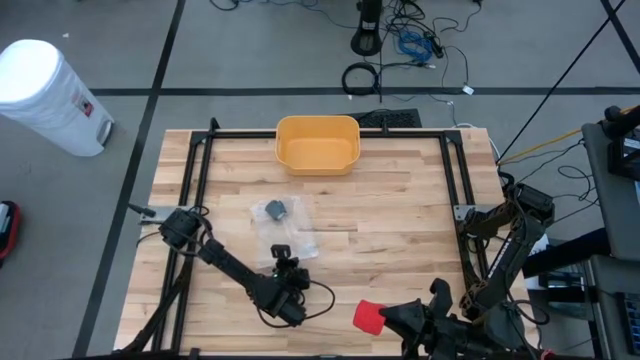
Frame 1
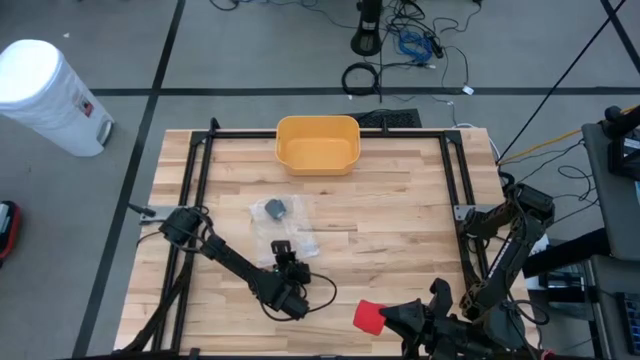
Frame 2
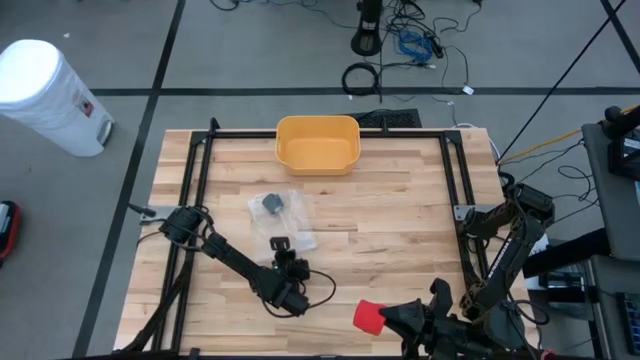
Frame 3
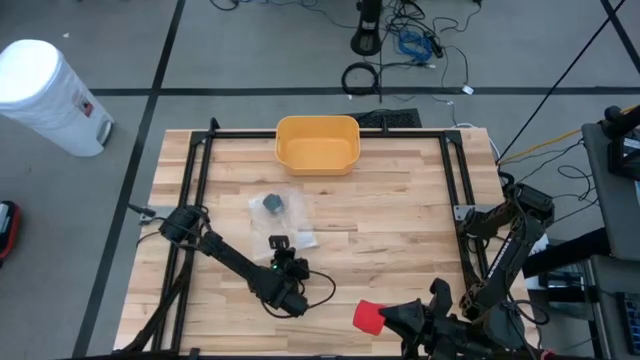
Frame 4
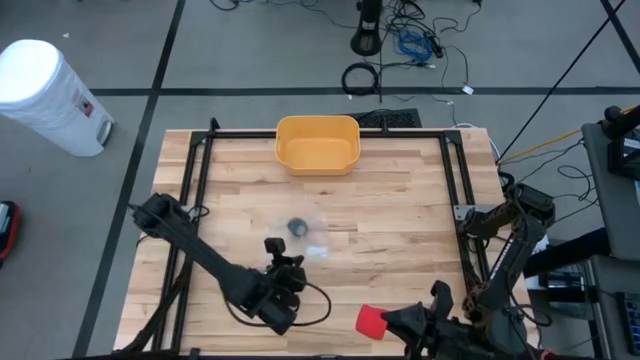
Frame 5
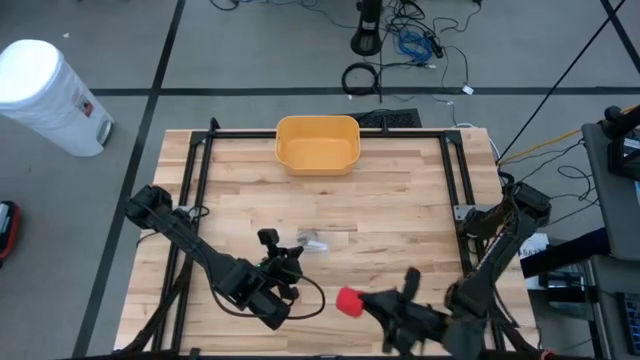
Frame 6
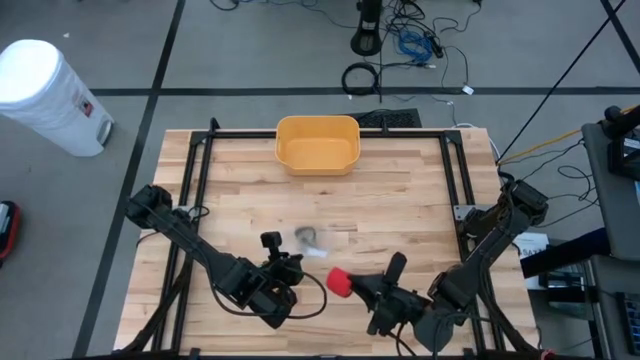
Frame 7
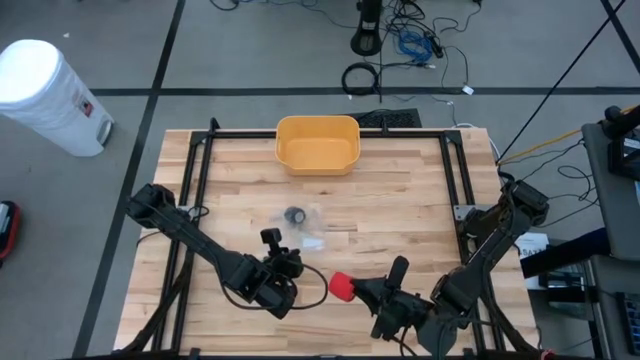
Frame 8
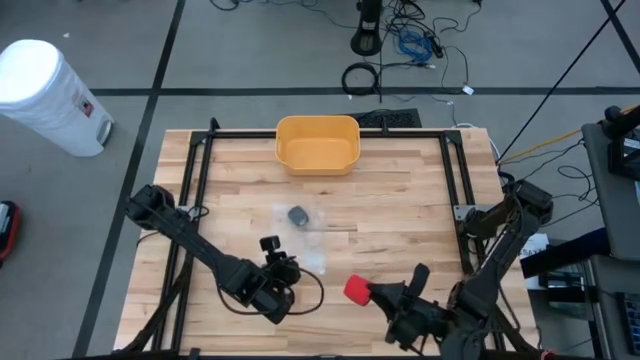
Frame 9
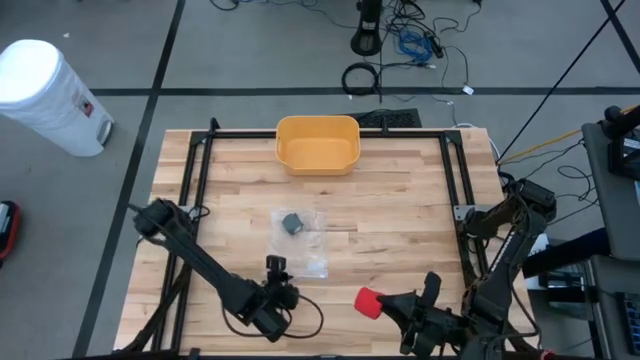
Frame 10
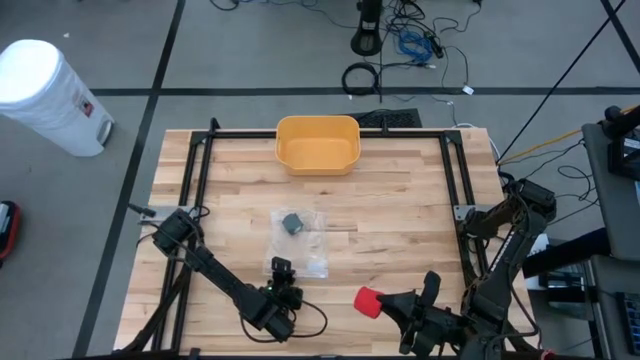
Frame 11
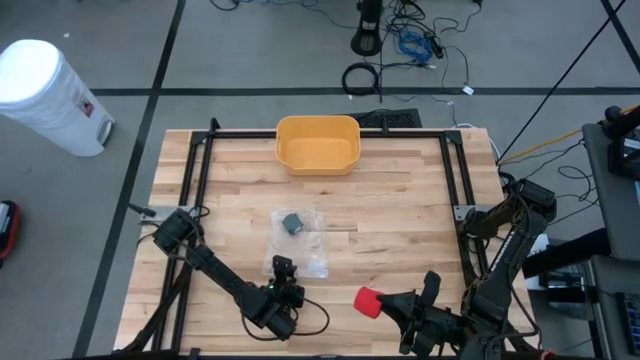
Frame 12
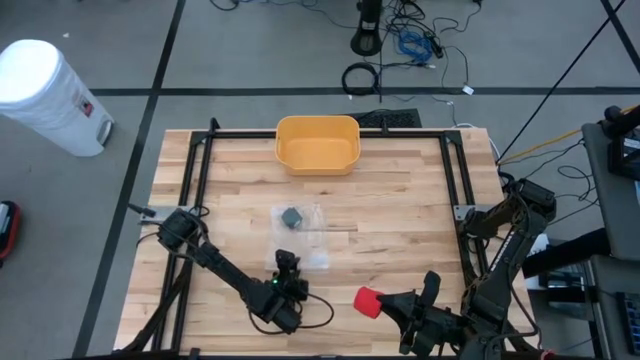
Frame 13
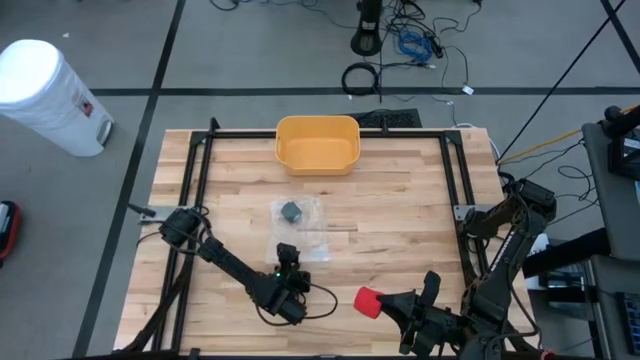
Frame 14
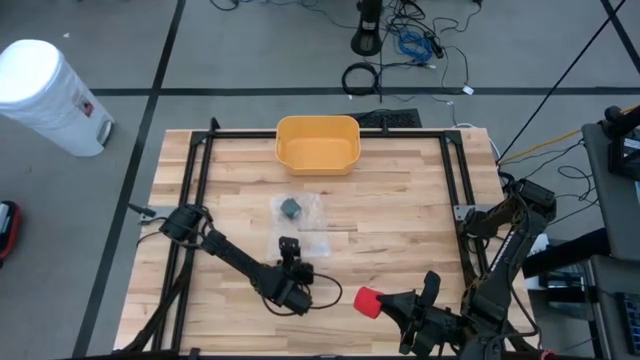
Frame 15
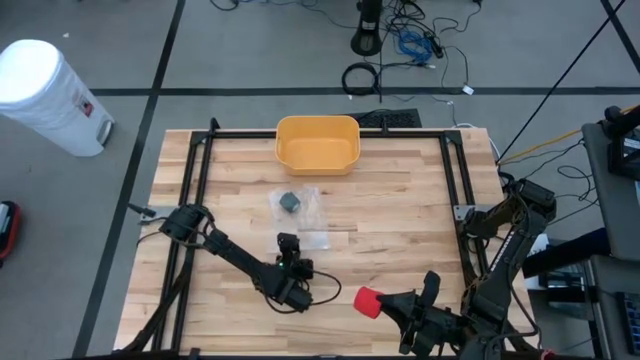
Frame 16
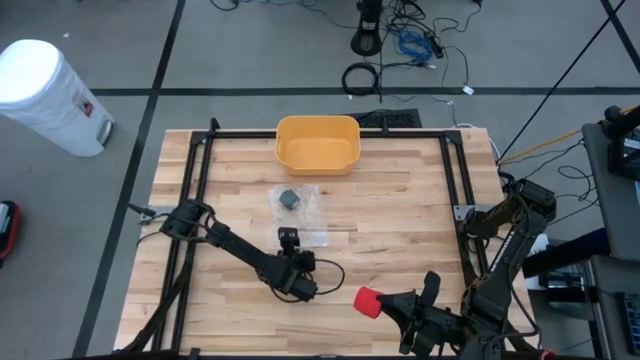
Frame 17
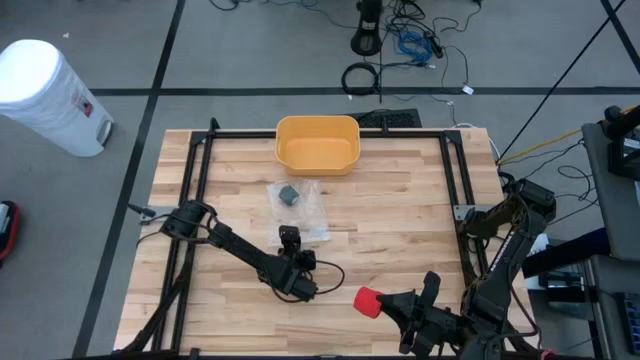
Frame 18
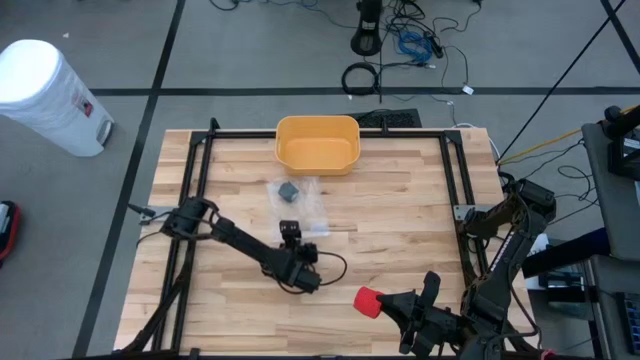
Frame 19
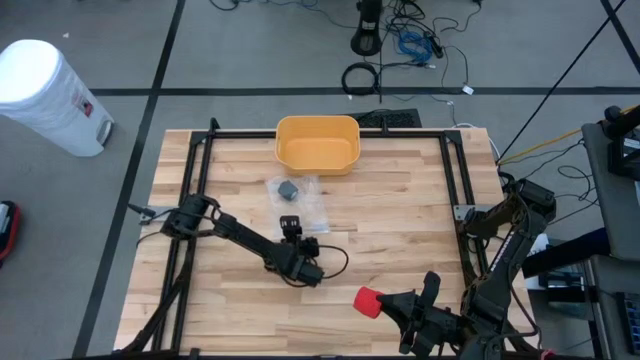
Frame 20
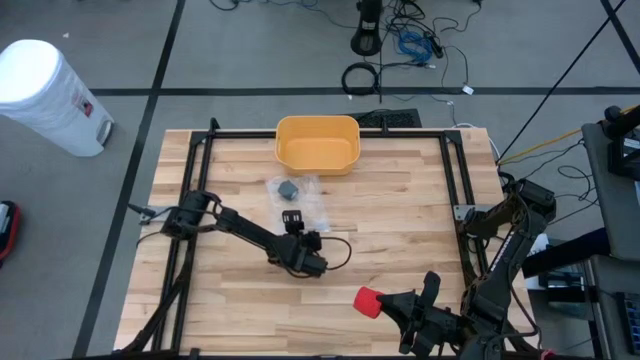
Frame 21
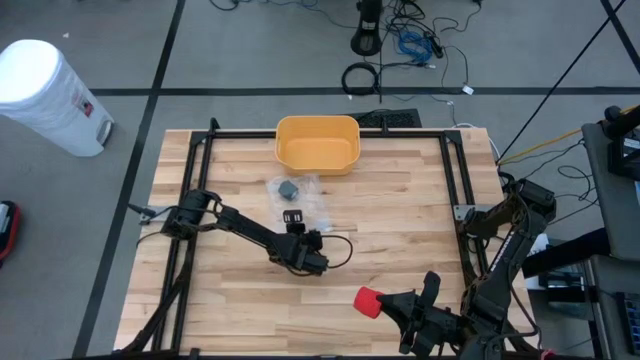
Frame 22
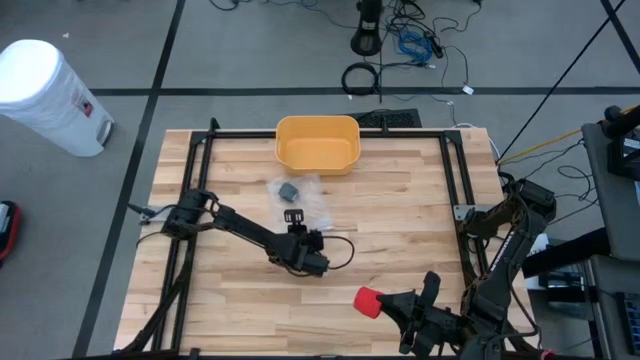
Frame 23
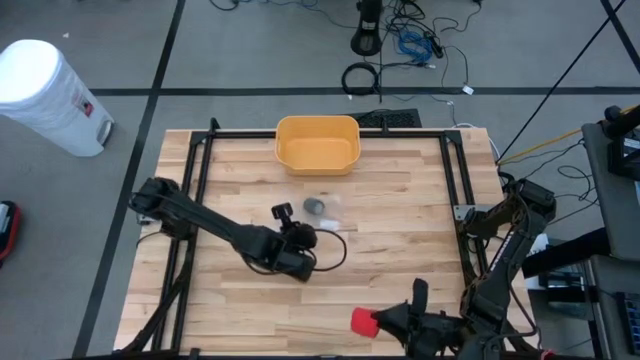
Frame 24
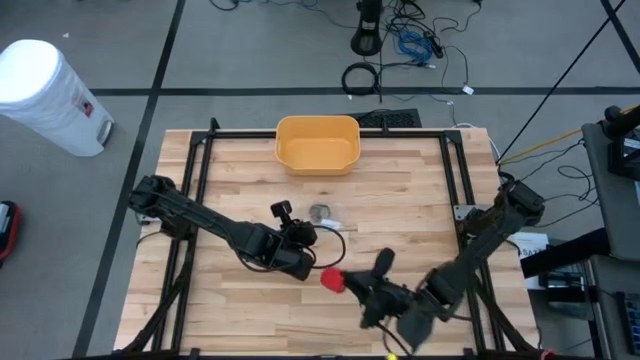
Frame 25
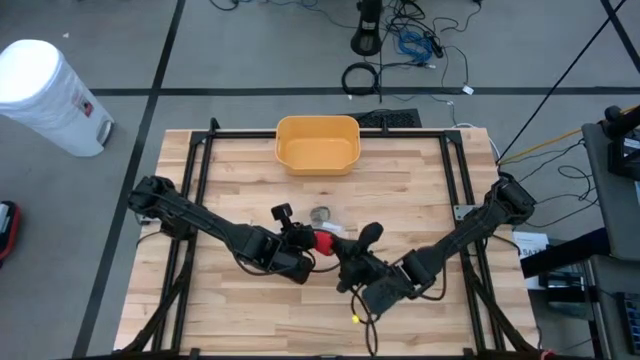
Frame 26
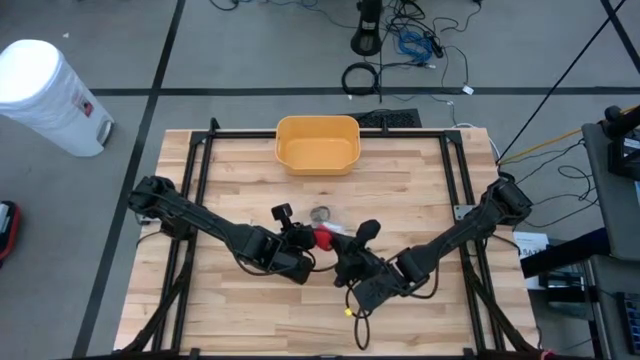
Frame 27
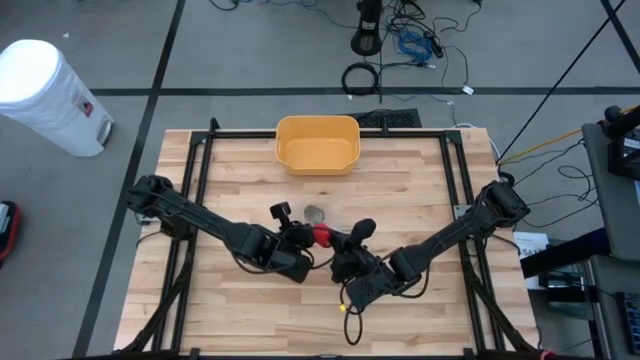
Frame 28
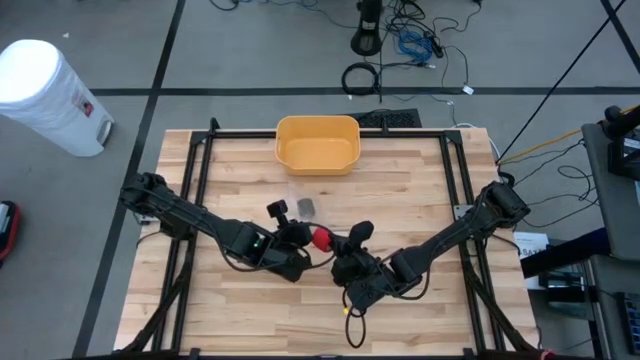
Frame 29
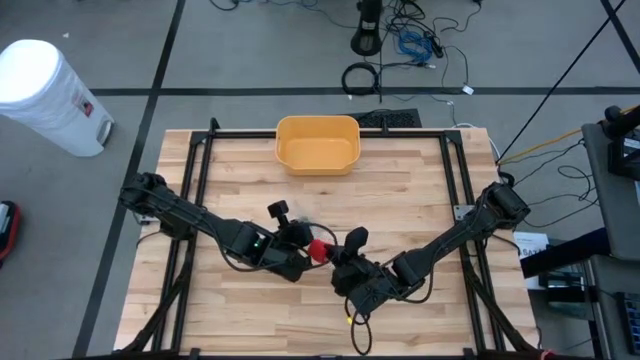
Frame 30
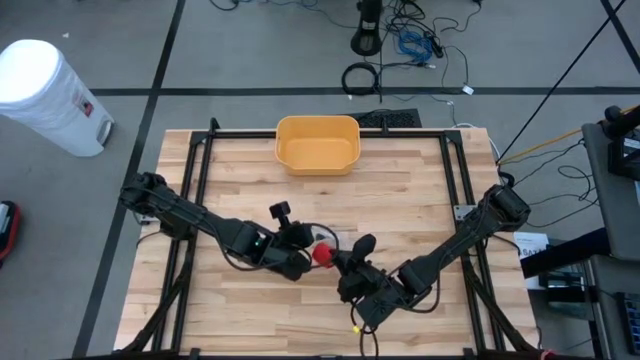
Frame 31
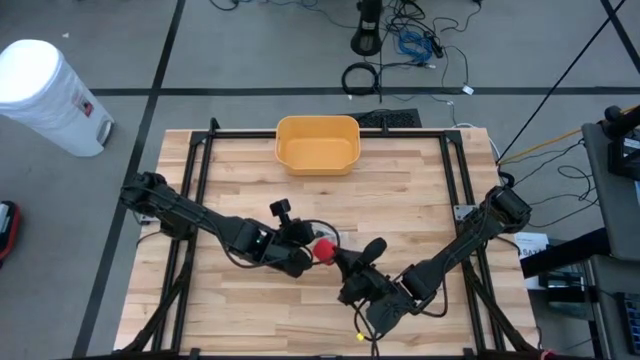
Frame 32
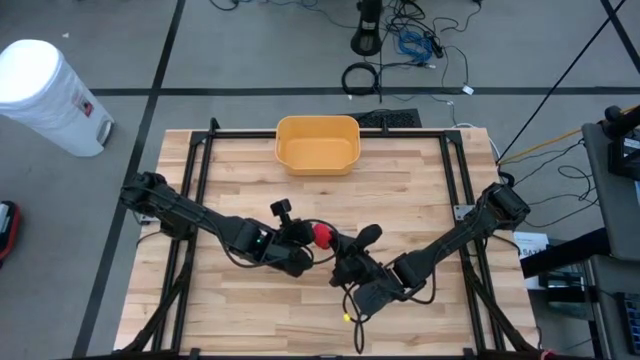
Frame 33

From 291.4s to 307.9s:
Task: Roll bandage
Put the red bandage into the transparent zip bag

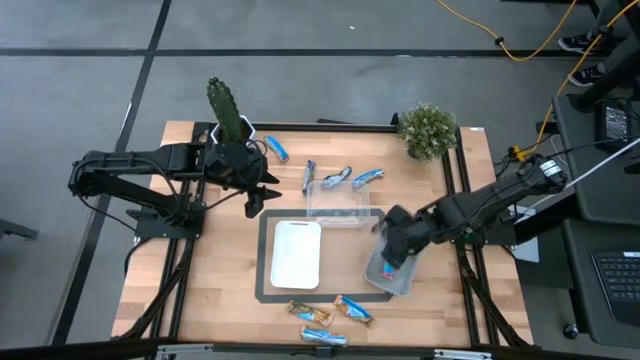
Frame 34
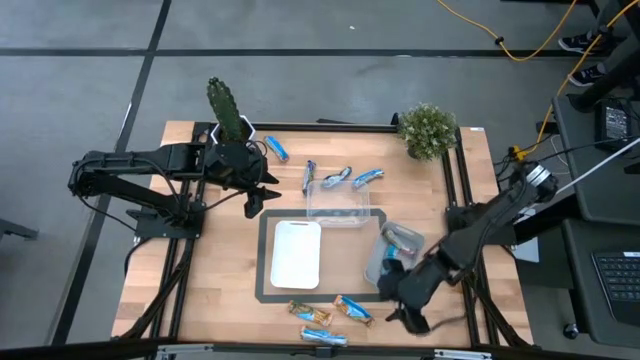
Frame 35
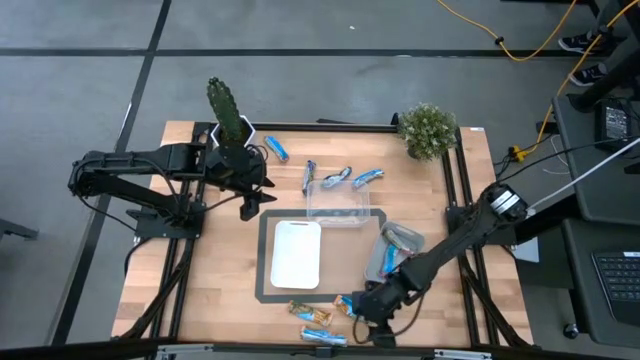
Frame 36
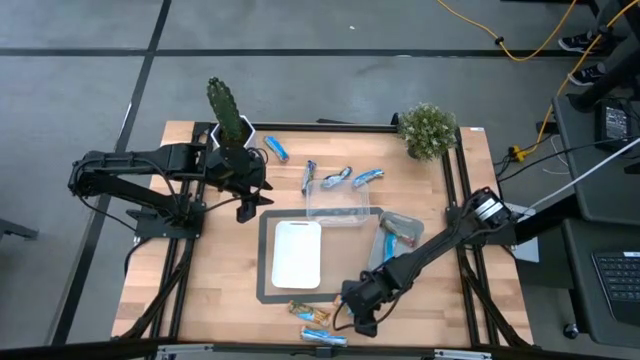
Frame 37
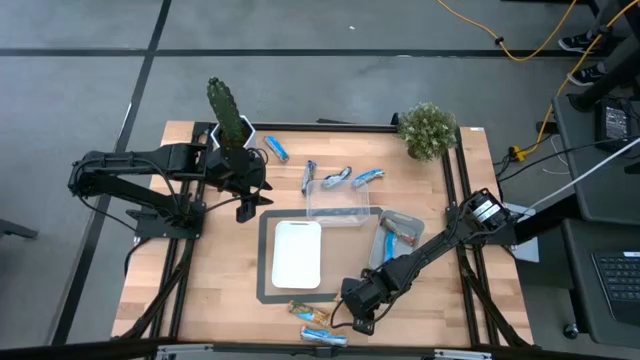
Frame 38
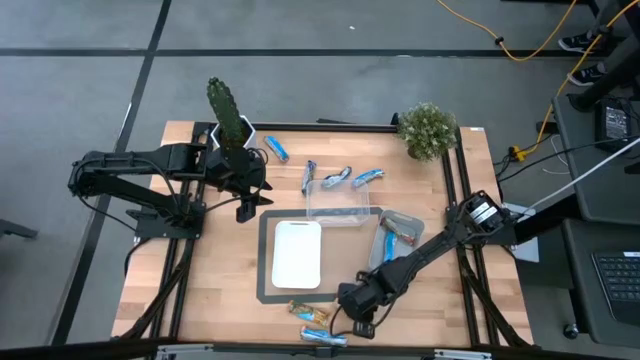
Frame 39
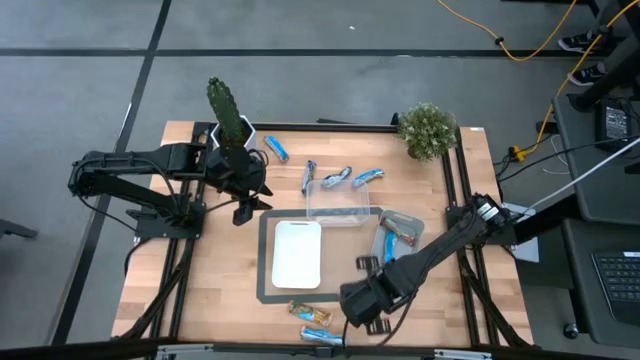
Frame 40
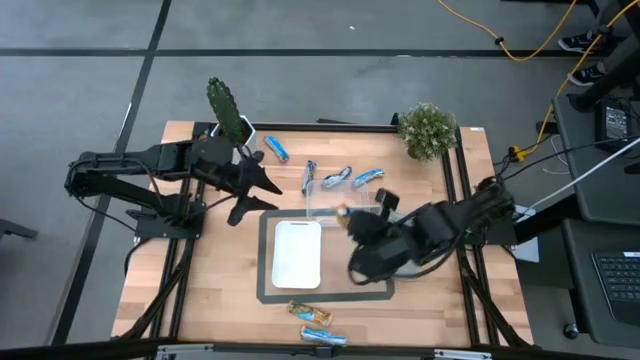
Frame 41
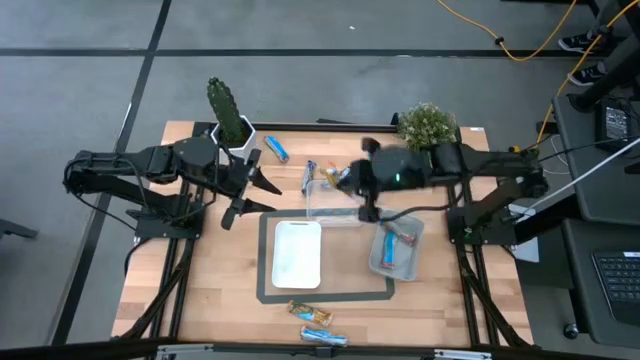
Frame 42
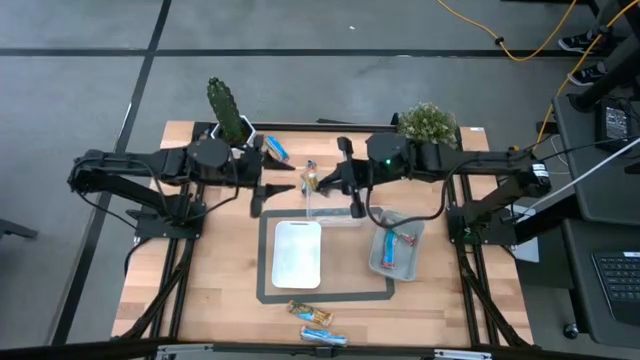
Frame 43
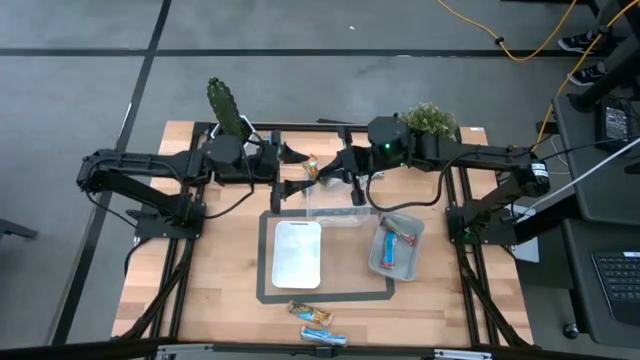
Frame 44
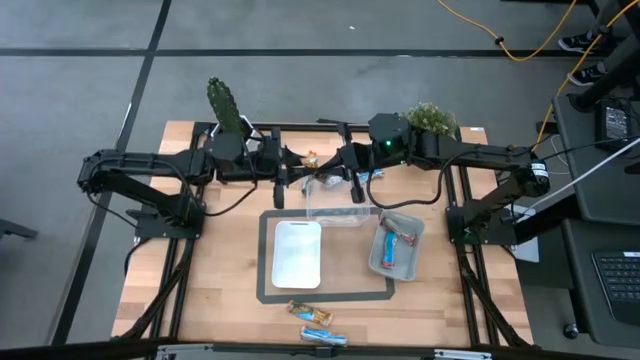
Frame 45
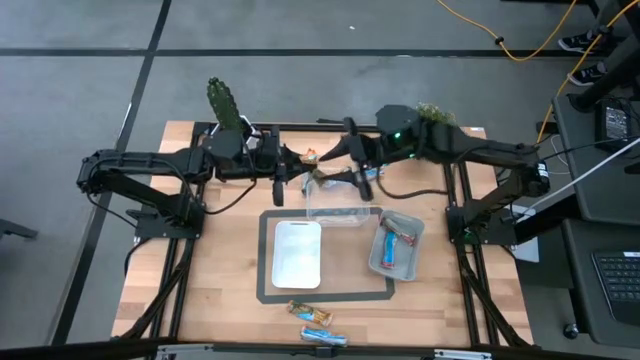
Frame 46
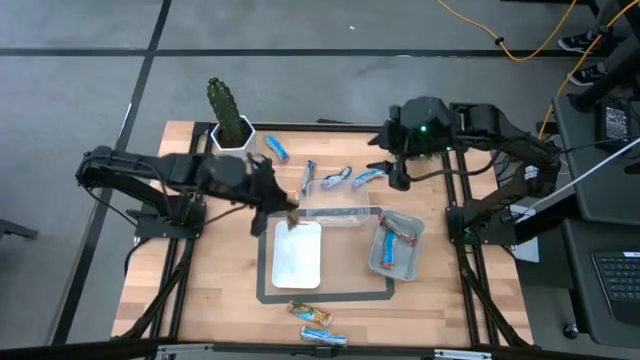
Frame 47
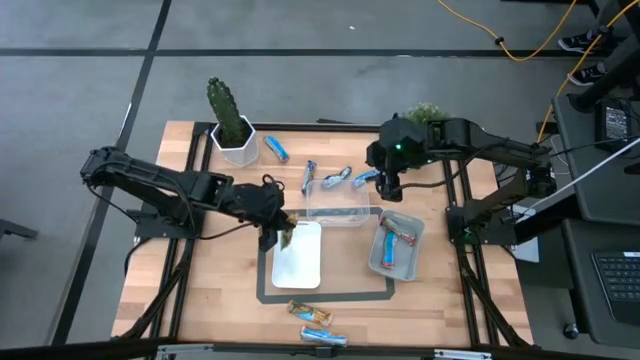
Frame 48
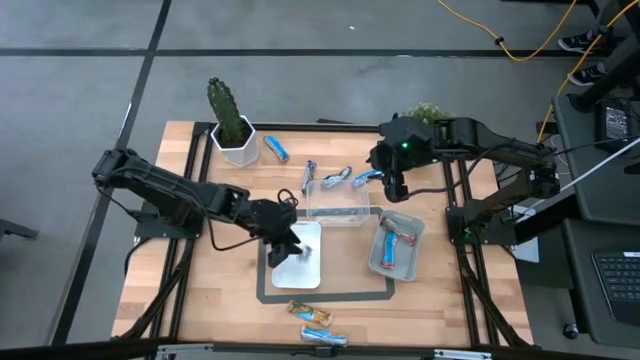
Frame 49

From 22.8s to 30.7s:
Task: Pick and place Granola Bars by type
Put the top right orange granola bar into the white bin
